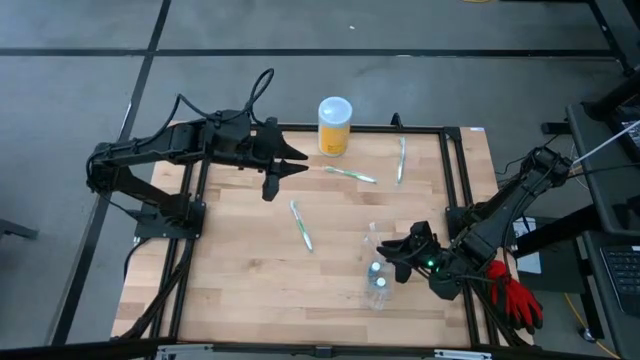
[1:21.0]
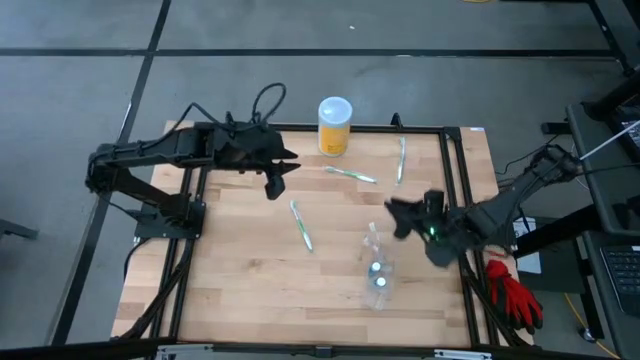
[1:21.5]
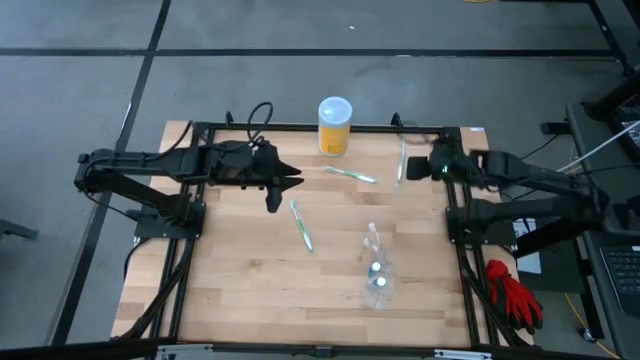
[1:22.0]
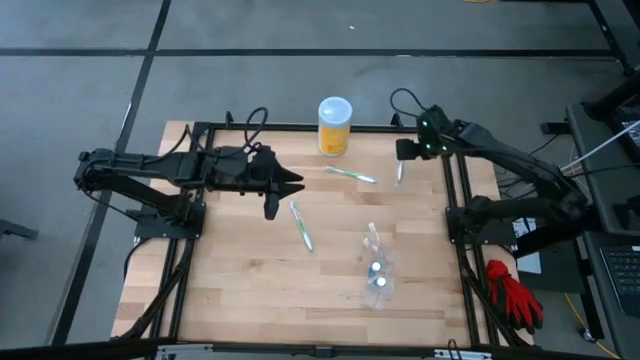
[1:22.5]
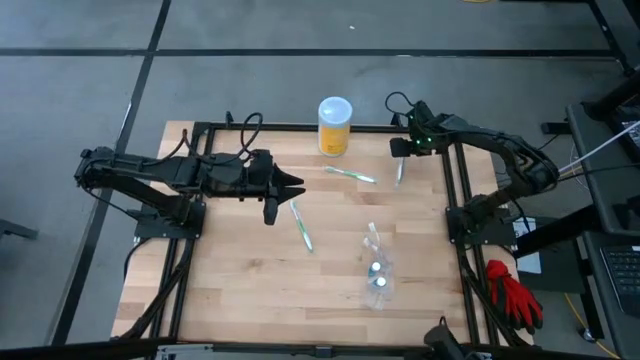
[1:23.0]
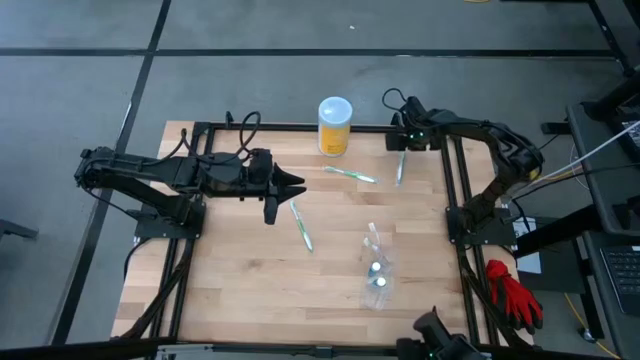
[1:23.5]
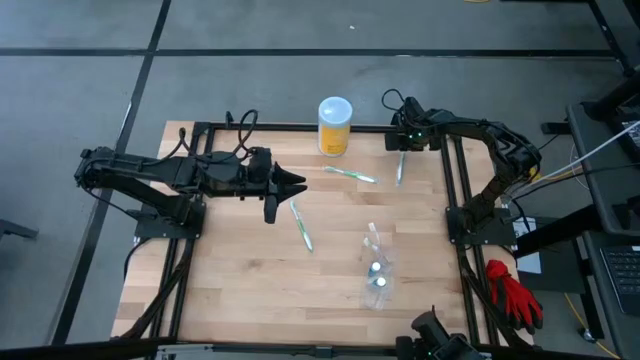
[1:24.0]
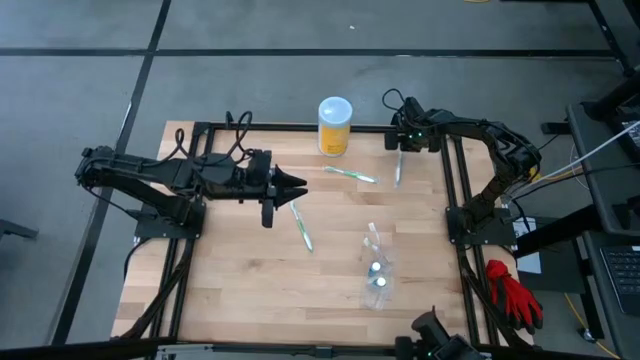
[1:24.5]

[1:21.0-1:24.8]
Task: Pick & Place toothbrushing station
Put the top right green toothbrush into the transparent organizer

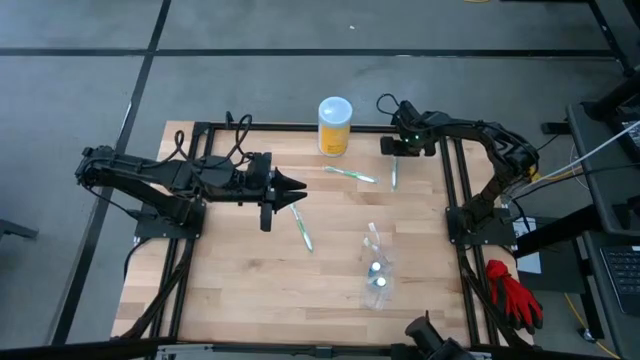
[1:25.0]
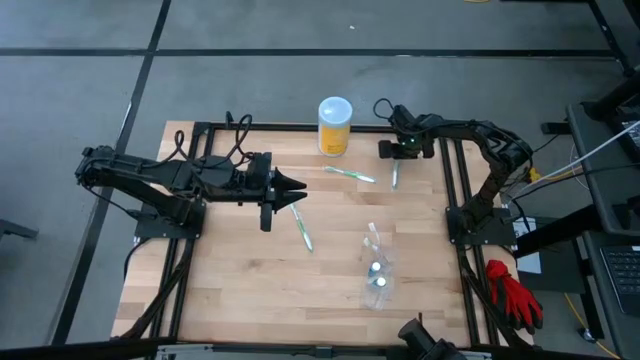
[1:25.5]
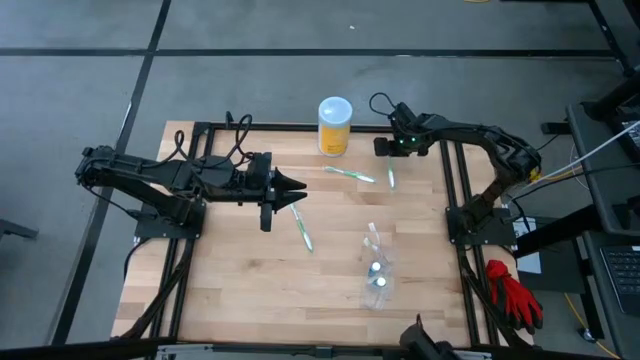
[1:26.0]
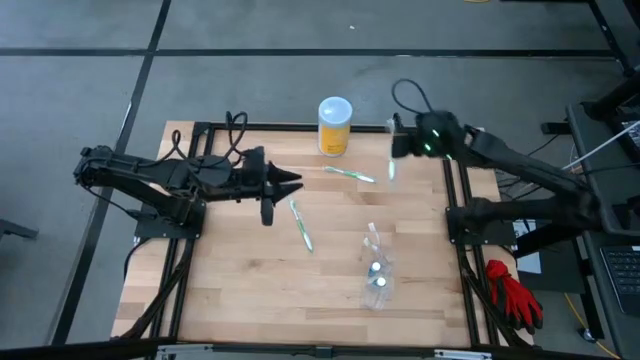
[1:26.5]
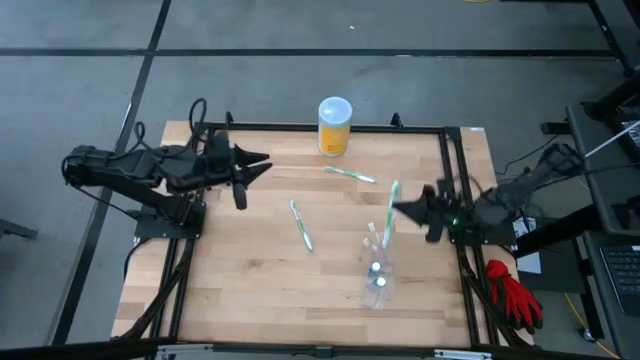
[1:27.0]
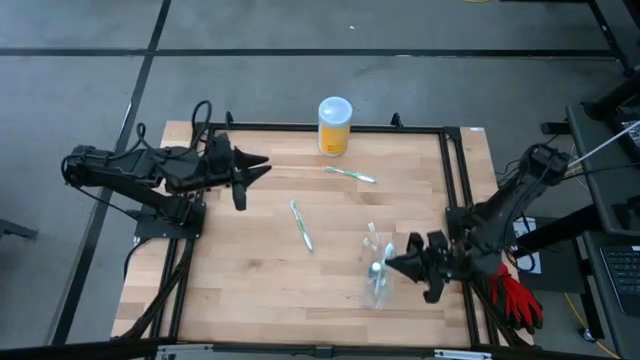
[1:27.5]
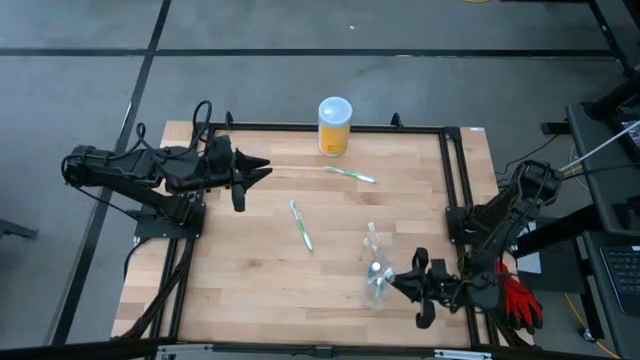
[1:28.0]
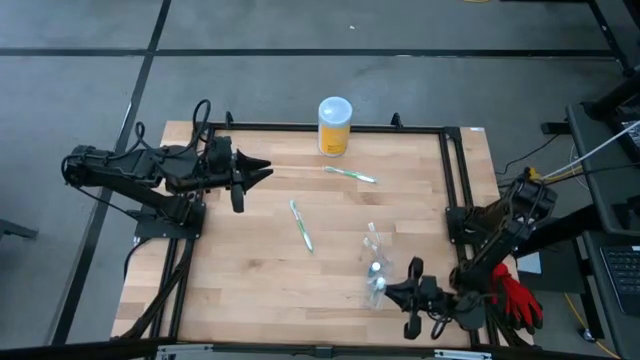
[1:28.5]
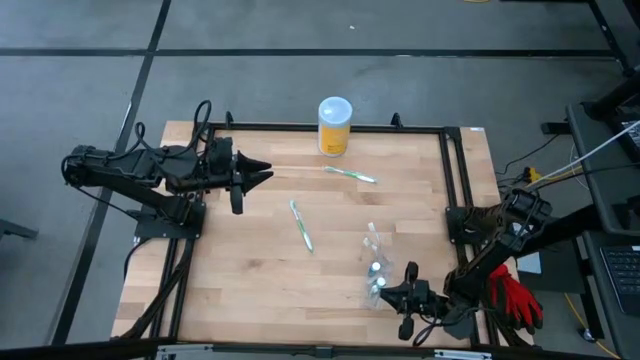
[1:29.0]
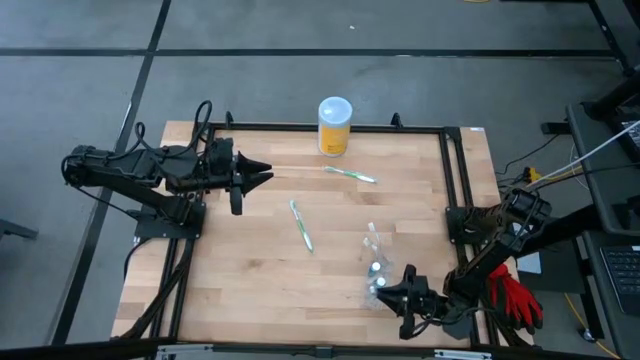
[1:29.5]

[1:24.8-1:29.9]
Put the top right green toothbrush into the transparent organizer

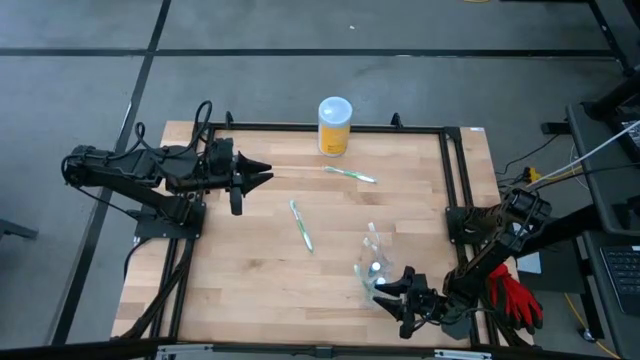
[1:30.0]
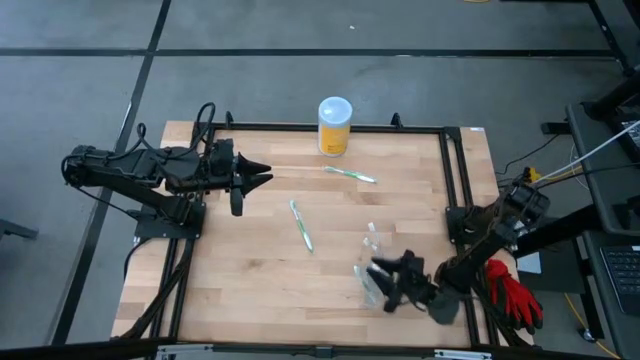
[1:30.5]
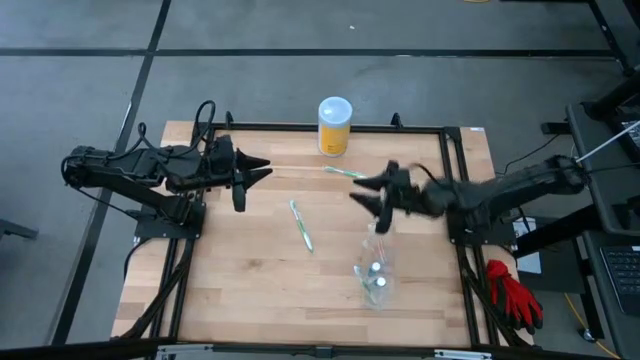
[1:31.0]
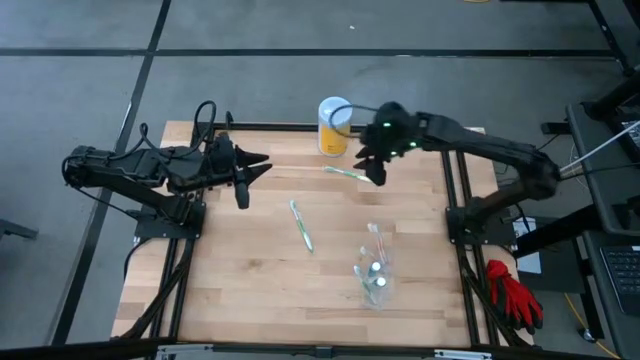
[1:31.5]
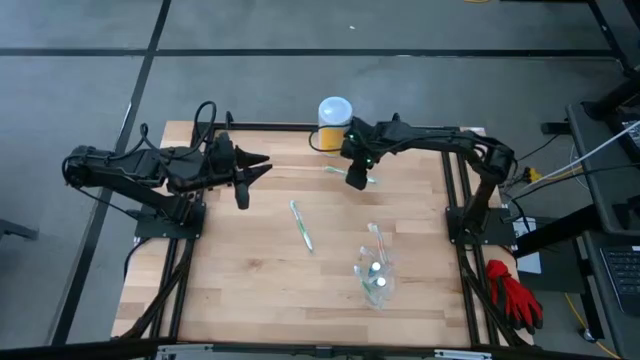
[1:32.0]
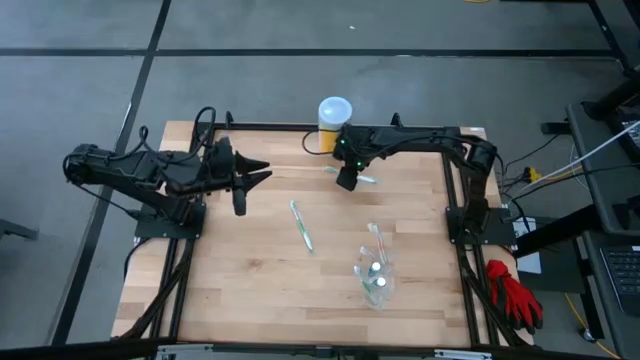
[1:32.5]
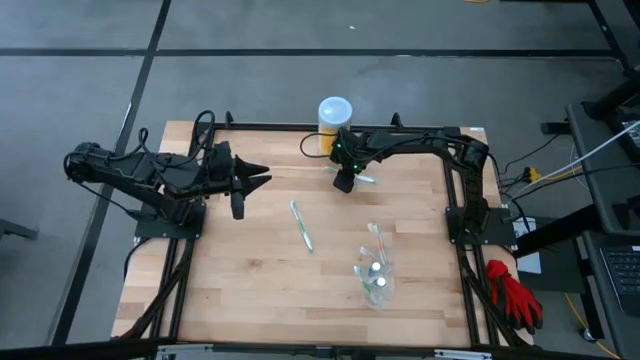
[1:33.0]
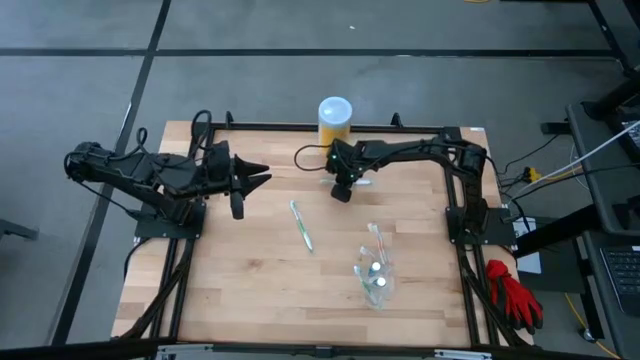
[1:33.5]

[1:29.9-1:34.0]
Put the top green toothbrush into the transparent organizer

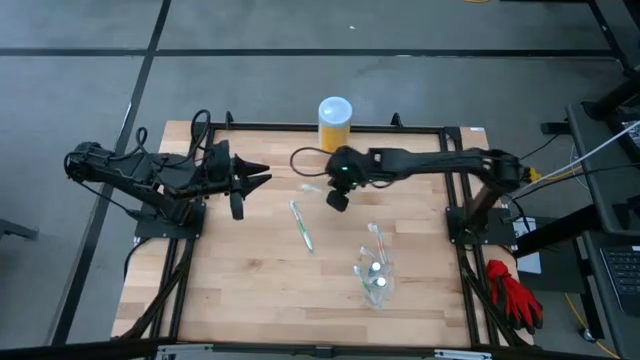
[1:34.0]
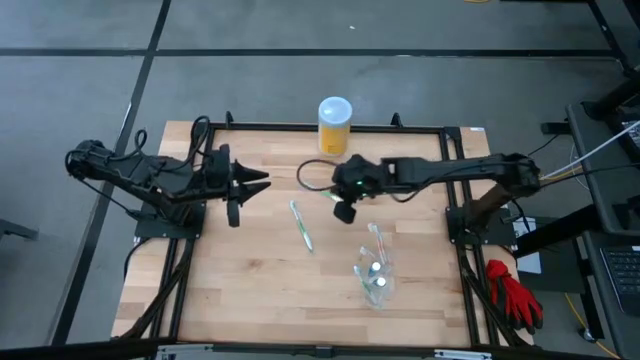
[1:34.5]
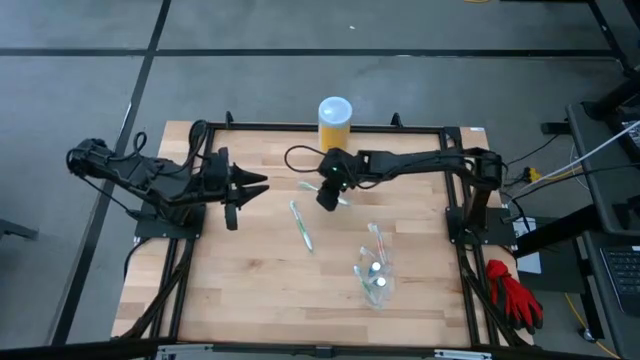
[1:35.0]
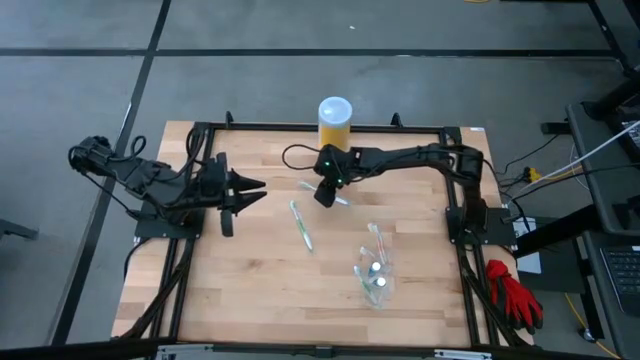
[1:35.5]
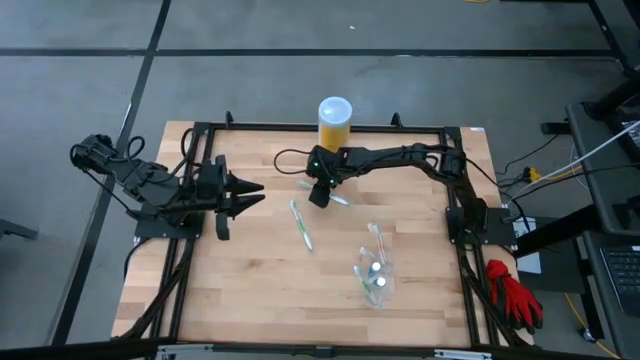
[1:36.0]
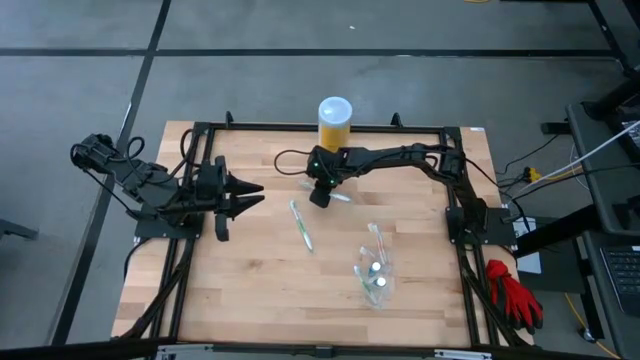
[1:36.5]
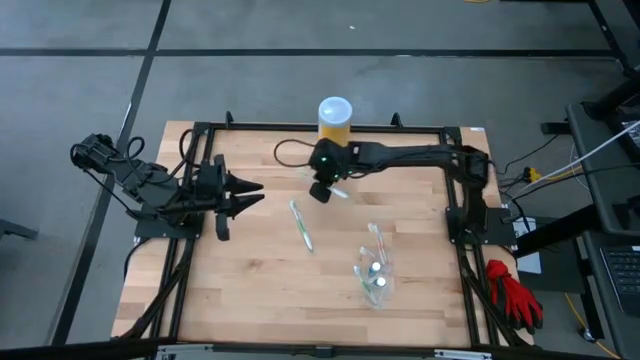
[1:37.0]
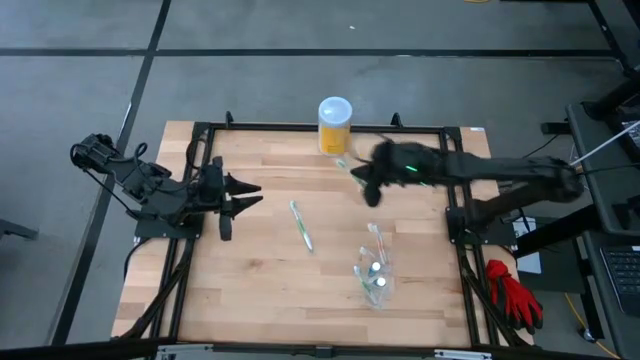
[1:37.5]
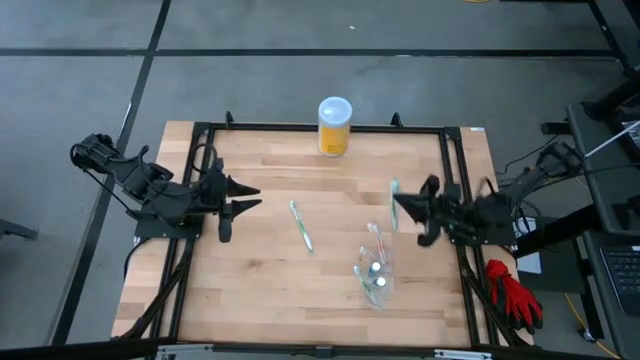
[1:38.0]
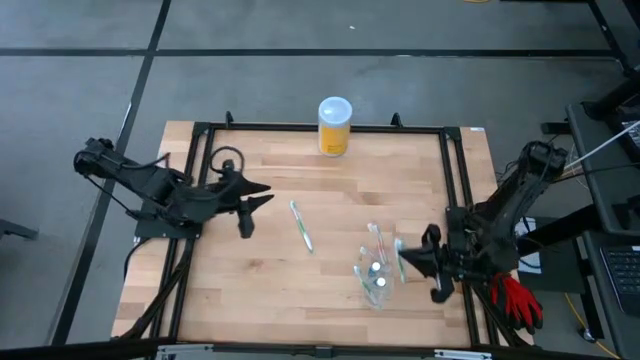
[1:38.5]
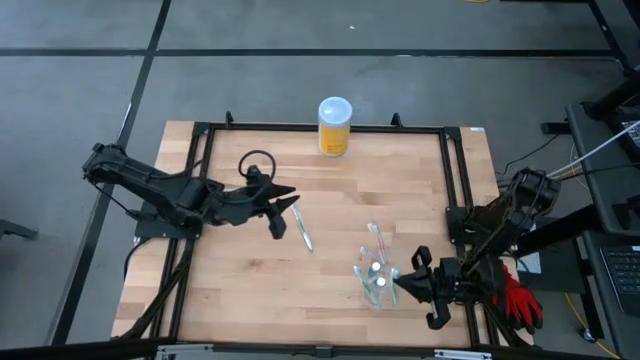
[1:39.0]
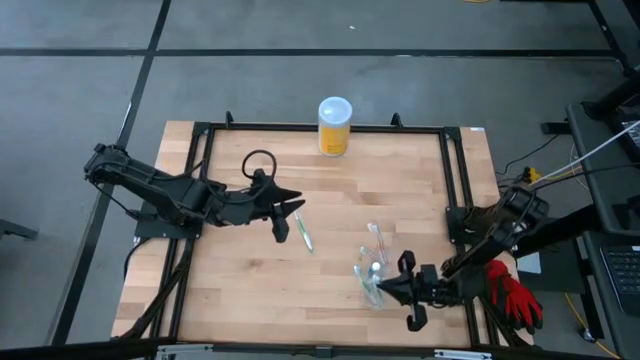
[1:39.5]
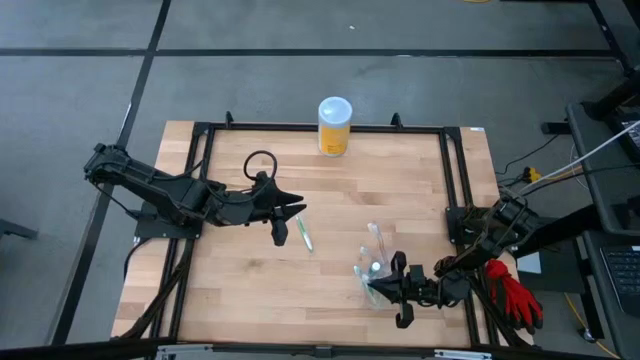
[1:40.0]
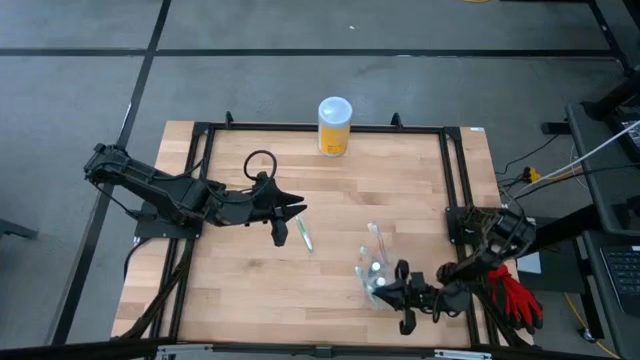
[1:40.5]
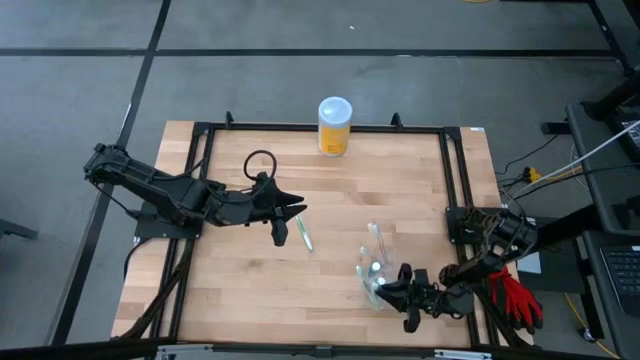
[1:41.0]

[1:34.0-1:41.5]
Put the top green toothbrush into the transparent organizer
